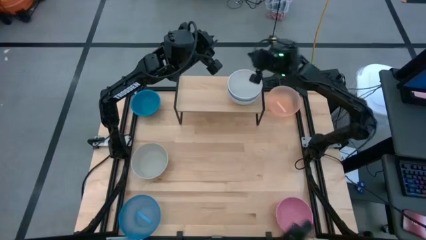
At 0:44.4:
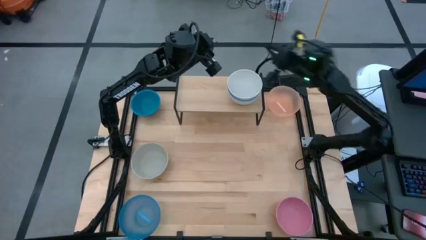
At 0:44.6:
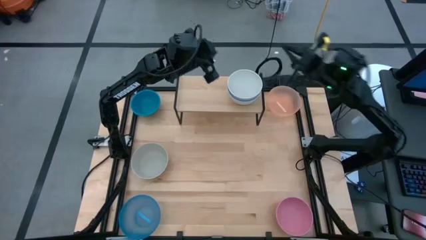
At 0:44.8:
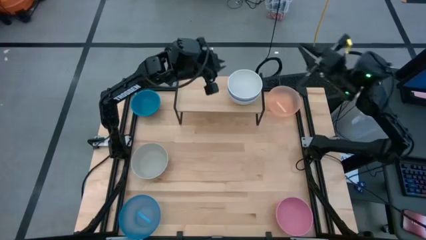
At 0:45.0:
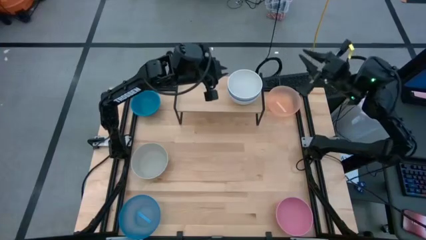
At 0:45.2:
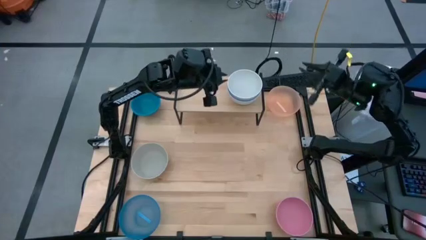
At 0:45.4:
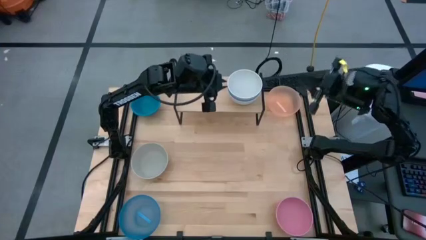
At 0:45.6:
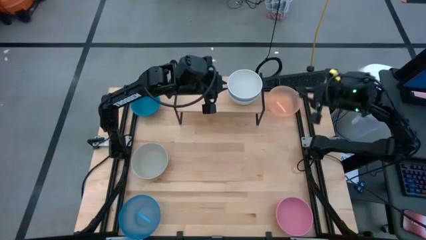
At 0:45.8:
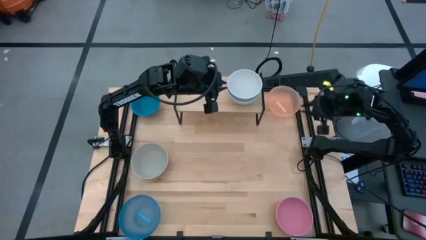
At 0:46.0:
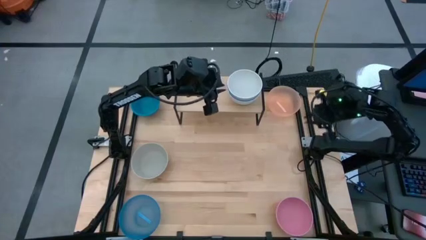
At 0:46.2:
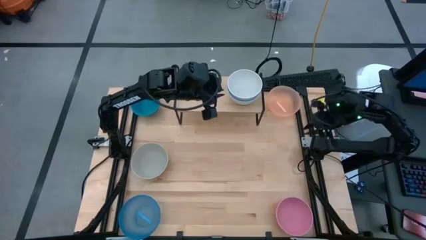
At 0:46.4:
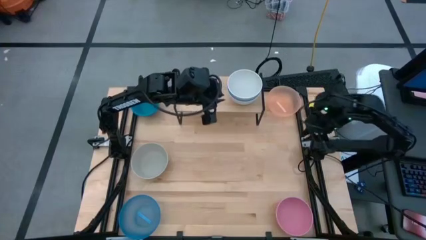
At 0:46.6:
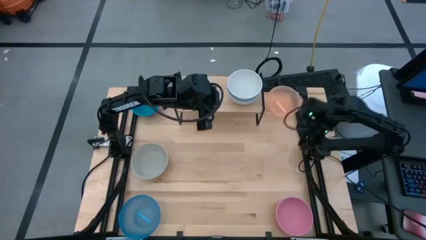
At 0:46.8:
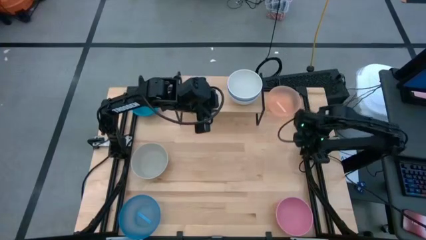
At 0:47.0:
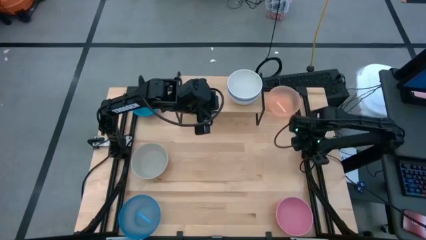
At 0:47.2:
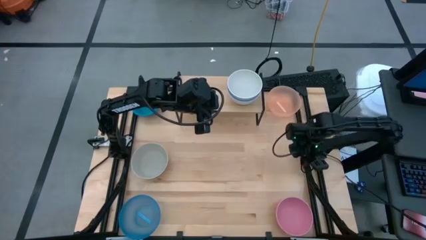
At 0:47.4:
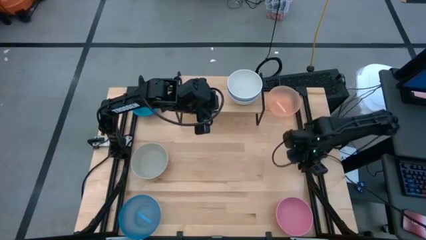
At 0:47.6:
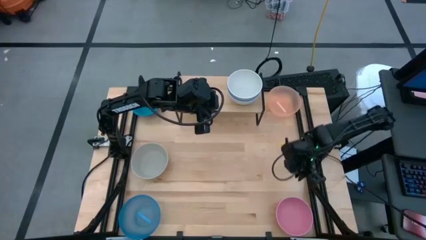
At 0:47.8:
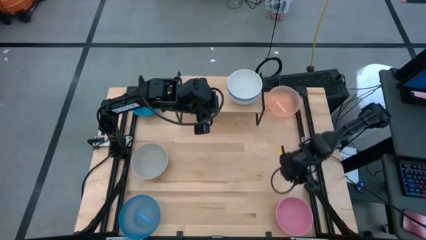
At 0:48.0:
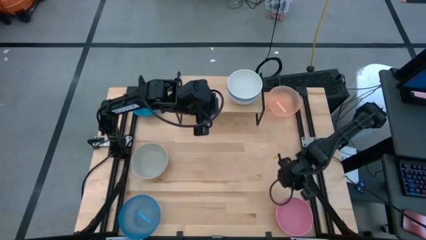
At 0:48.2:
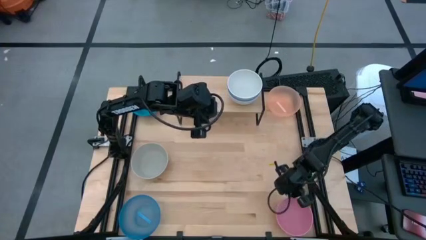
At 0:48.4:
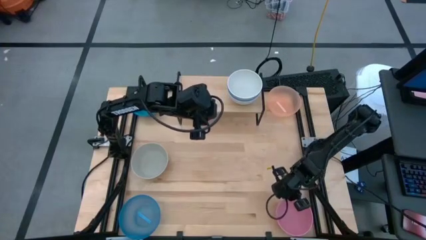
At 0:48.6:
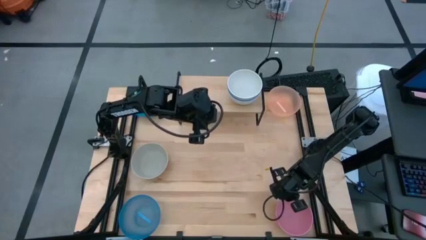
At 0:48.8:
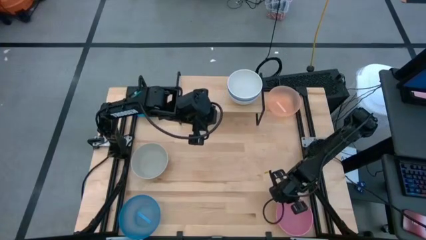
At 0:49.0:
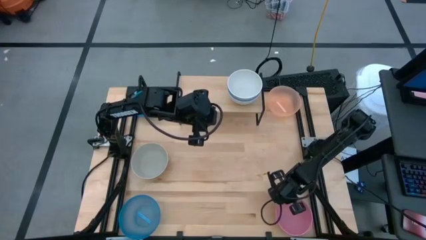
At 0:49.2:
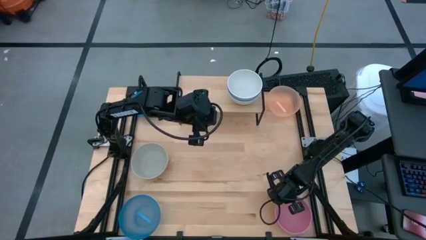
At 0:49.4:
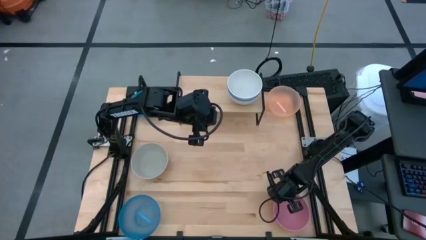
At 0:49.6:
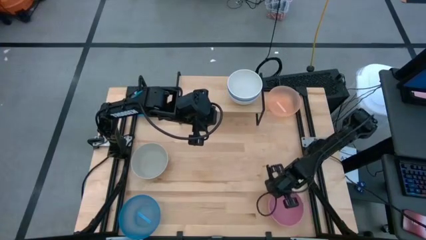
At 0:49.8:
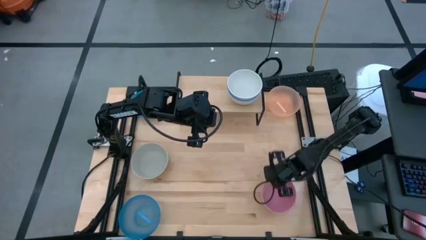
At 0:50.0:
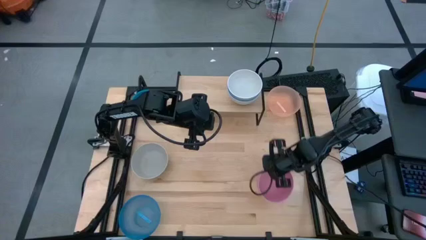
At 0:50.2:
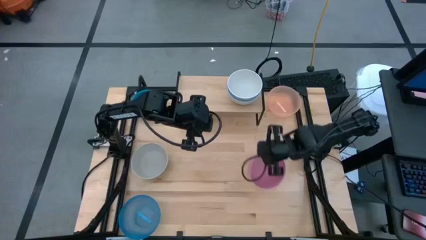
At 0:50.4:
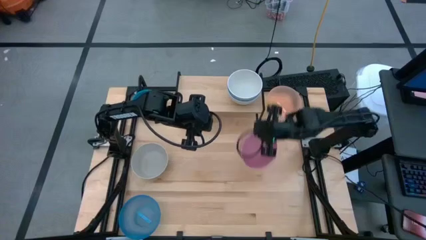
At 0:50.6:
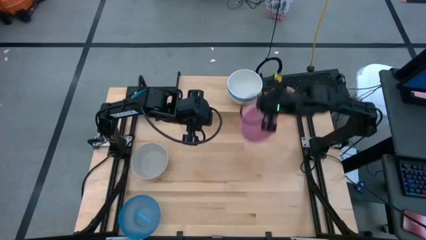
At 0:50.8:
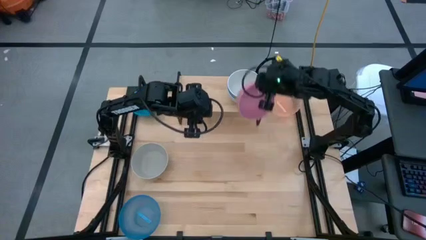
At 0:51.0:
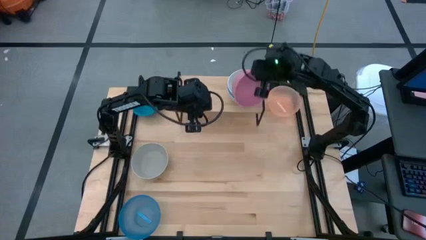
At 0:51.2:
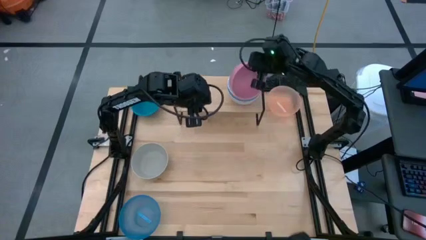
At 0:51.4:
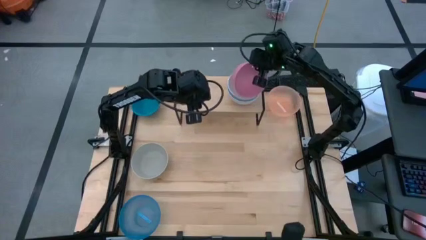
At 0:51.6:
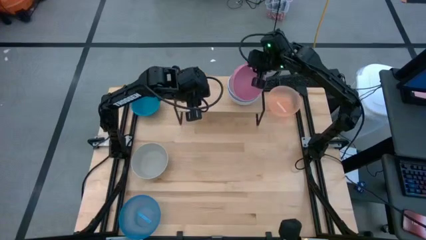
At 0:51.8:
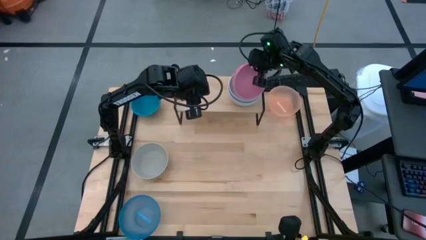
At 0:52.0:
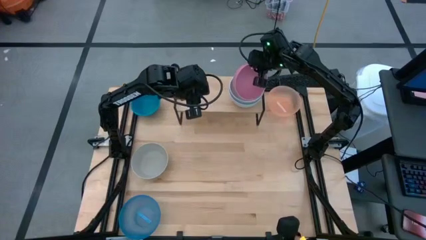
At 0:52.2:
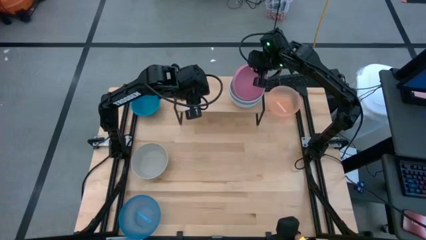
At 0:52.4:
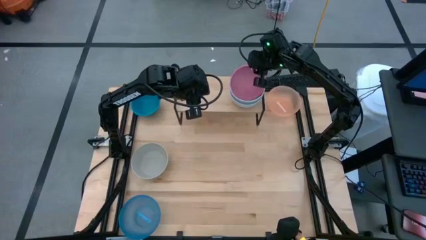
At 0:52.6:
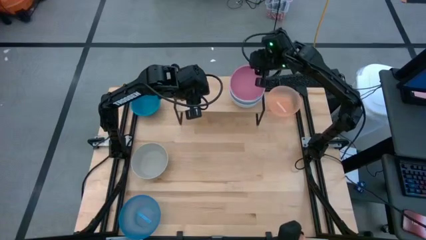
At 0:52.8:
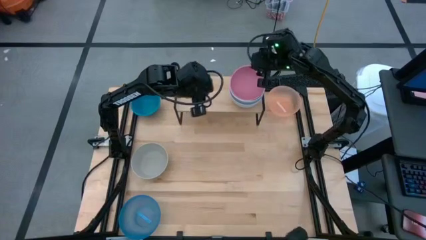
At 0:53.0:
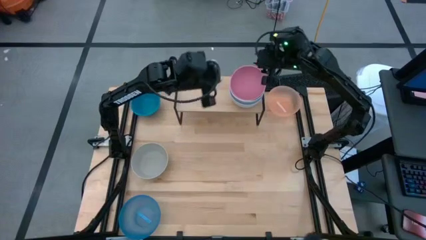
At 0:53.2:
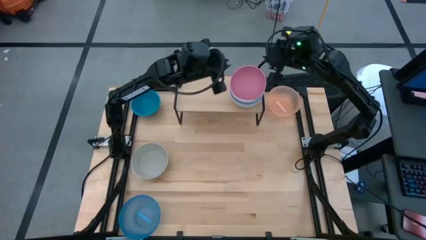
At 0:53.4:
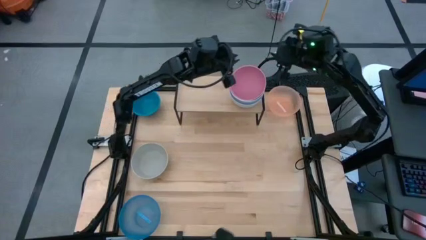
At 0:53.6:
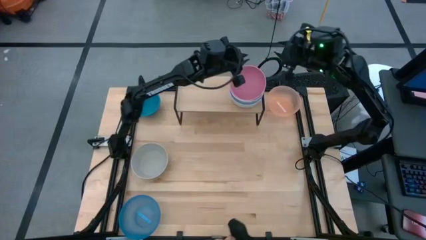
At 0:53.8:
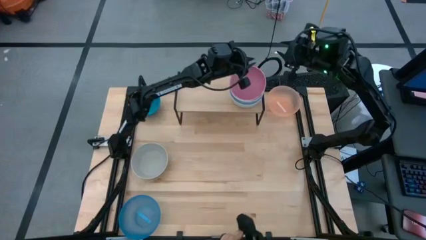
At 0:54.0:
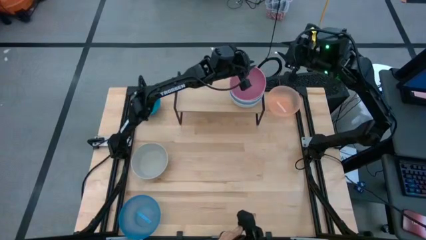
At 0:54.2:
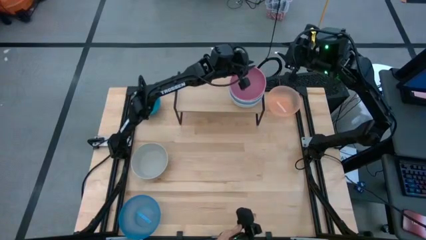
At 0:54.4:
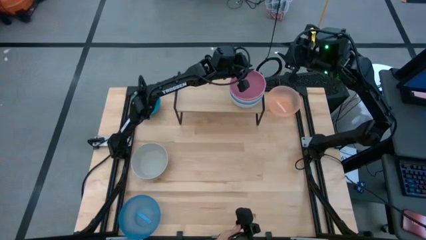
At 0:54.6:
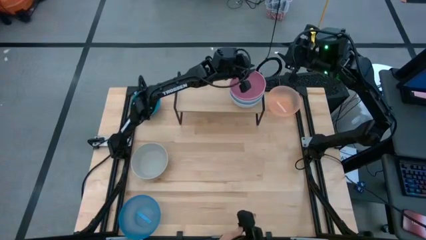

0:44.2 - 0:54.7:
Task: Place and stack bowls onto a shelf
Stack the pink bowl on top of the white bowl on the shelf

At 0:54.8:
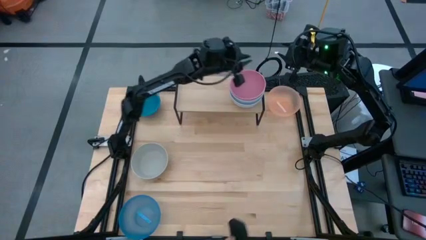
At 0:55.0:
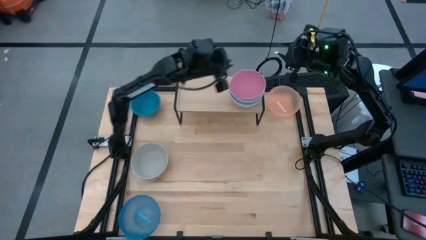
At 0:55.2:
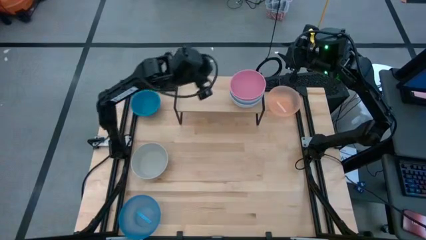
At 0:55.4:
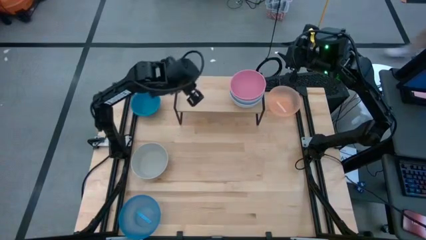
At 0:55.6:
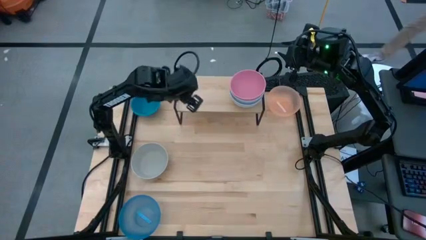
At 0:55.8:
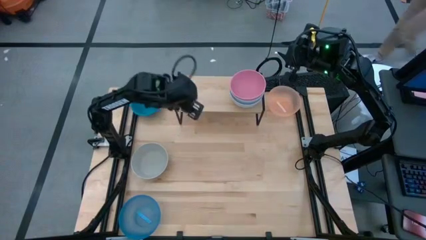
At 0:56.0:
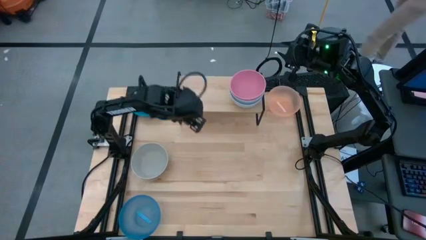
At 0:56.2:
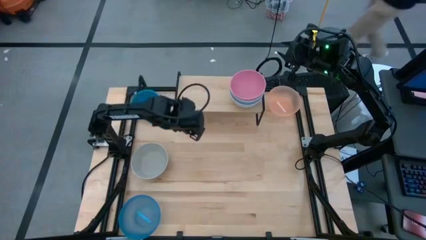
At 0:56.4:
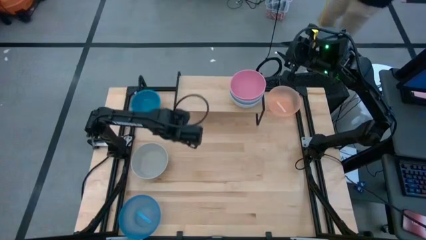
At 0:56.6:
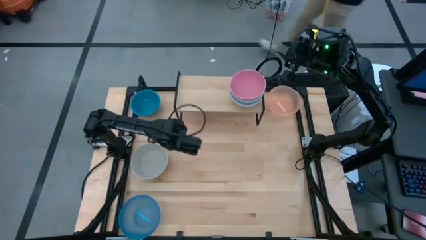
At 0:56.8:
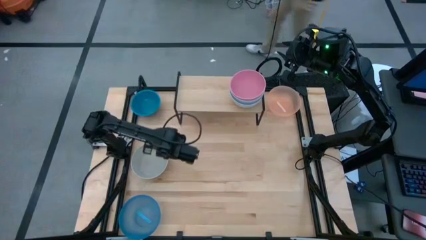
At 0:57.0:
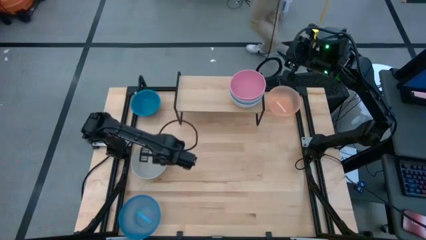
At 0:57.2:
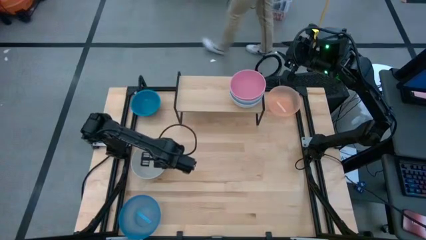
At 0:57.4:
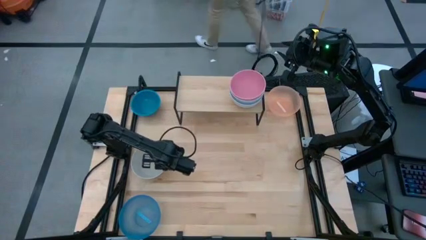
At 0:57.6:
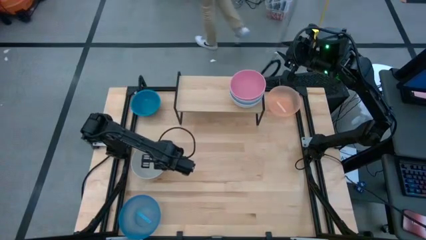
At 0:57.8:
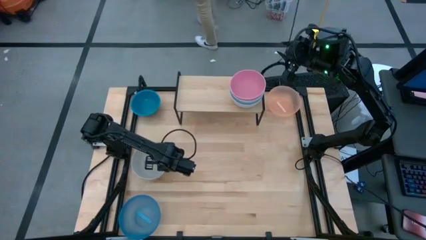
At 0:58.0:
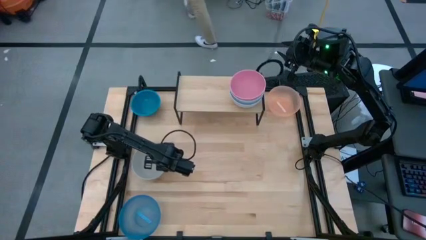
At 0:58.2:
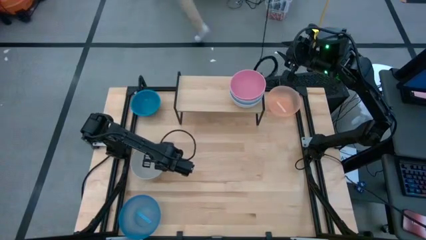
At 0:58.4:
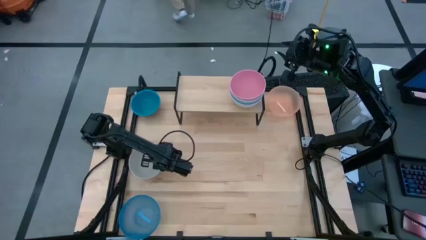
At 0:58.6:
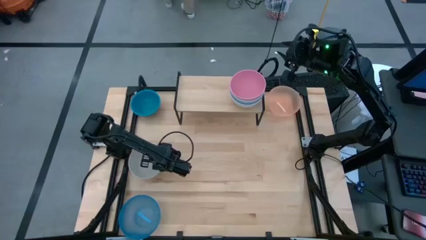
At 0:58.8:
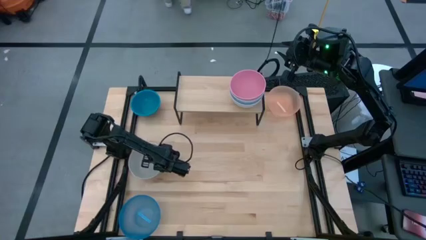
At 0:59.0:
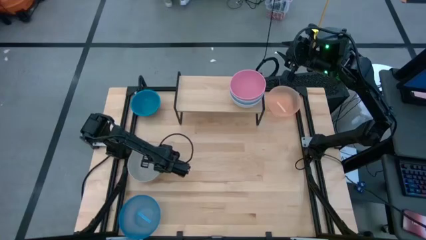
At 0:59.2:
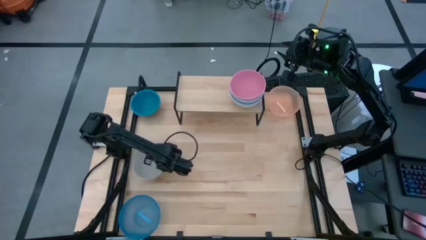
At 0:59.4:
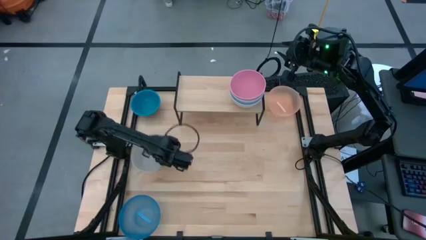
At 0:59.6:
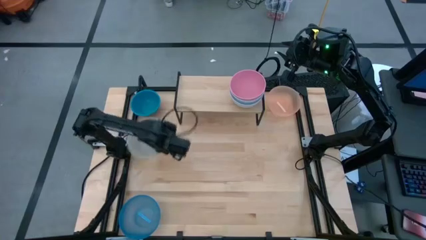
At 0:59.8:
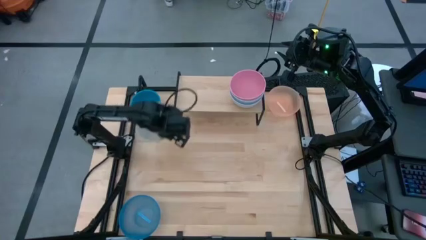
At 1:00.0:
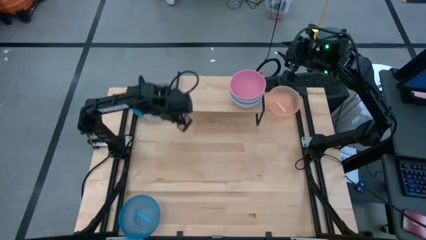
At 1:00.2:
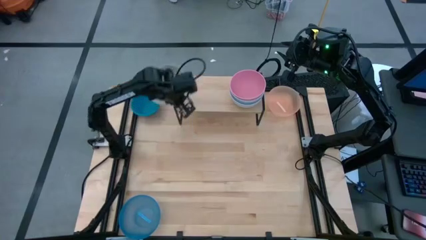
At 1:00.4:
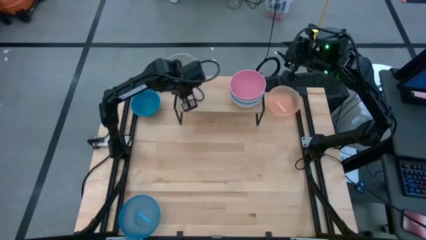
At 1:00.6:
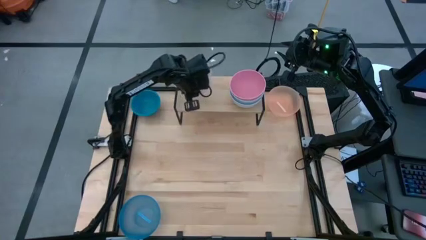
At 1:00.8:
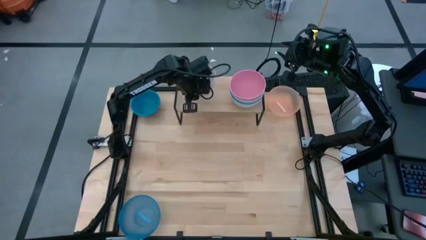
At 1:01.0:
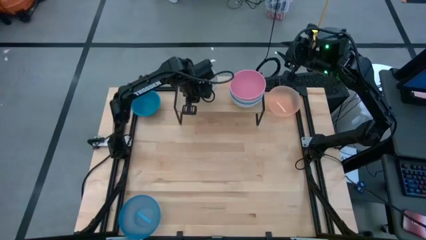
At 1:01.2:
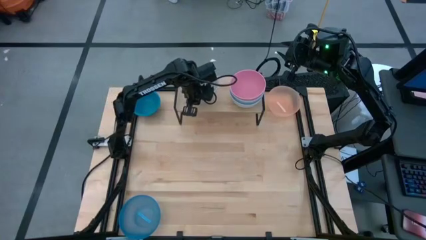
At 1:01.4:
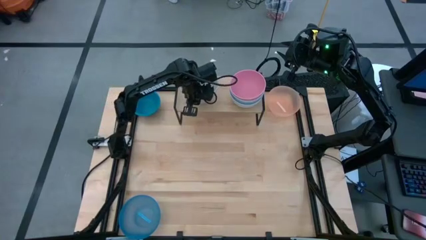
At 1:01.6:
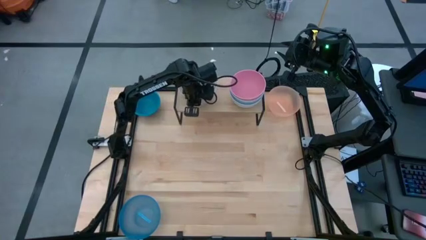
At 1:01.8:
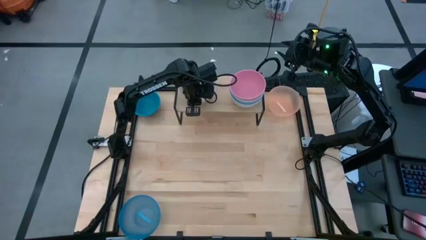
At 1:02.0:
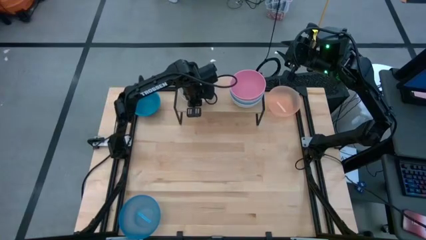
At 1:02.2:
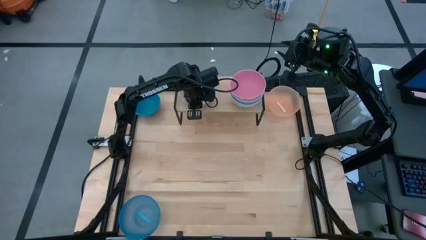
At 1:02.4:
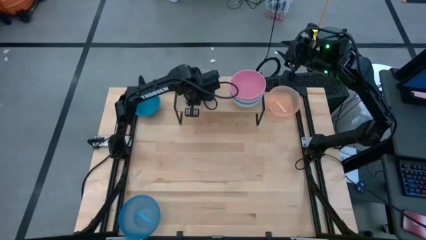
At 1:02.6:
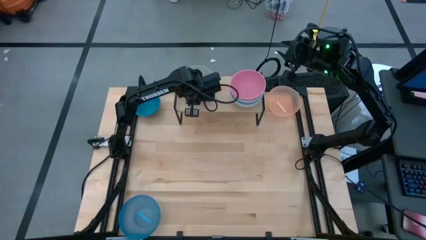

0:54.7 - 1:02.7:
Put the gray bowl on the shelf
